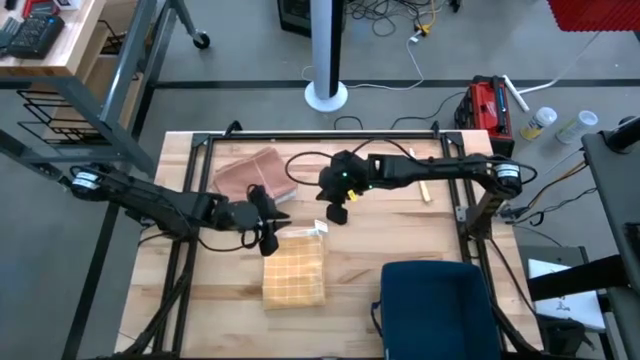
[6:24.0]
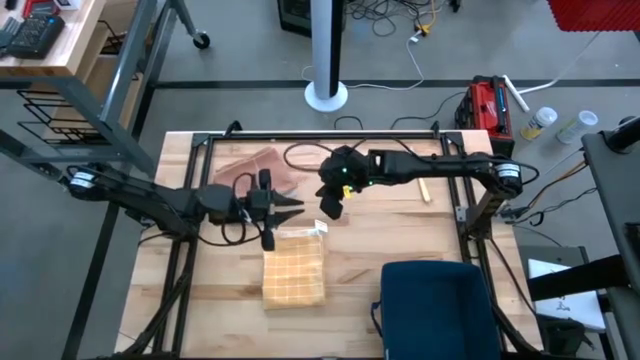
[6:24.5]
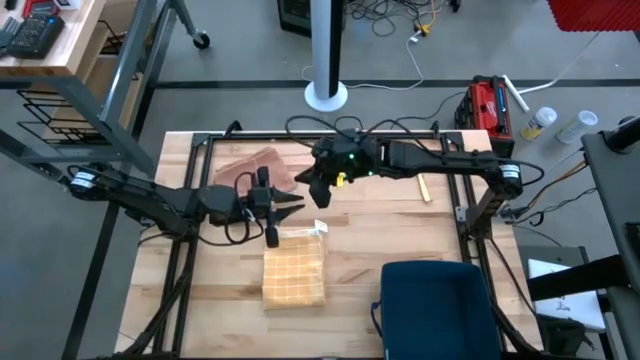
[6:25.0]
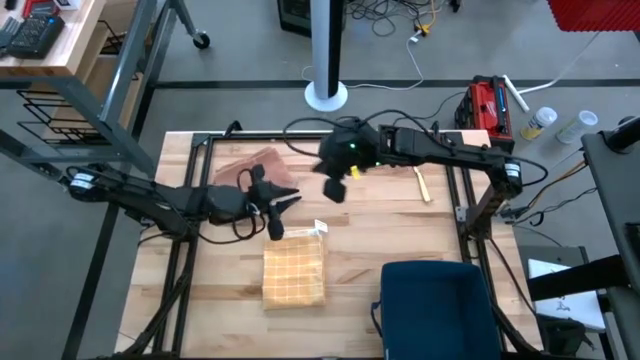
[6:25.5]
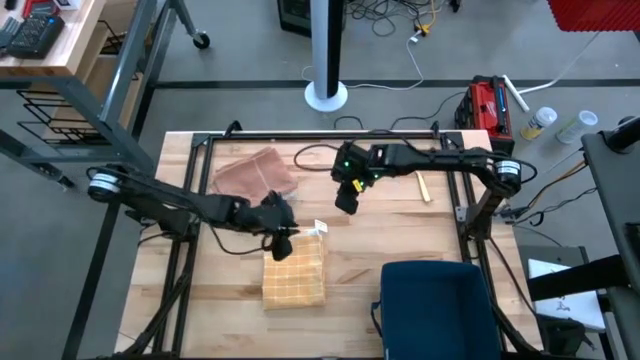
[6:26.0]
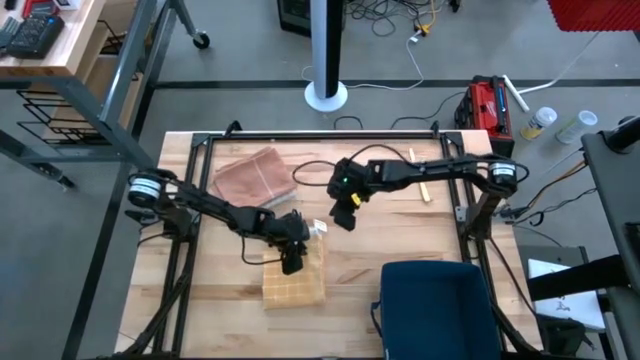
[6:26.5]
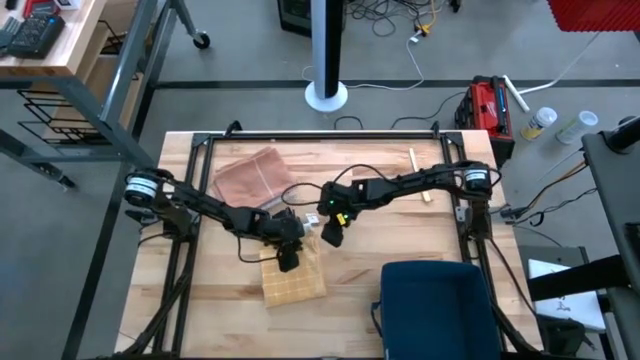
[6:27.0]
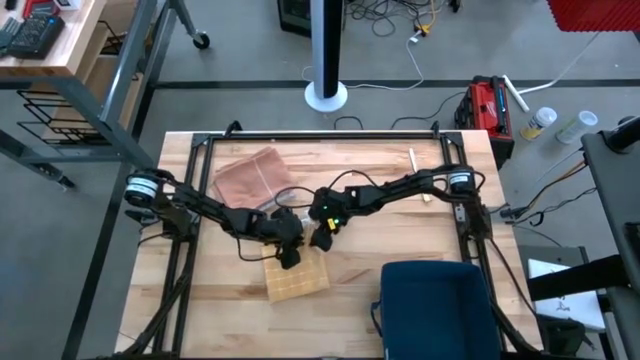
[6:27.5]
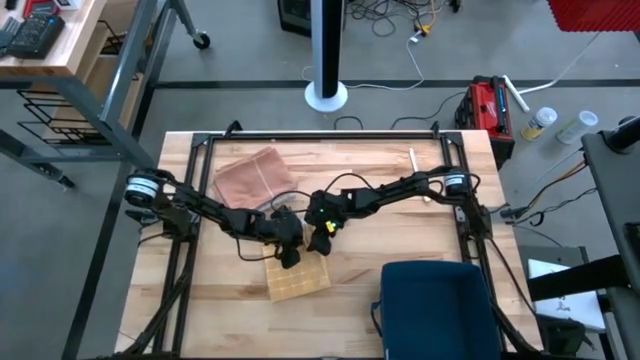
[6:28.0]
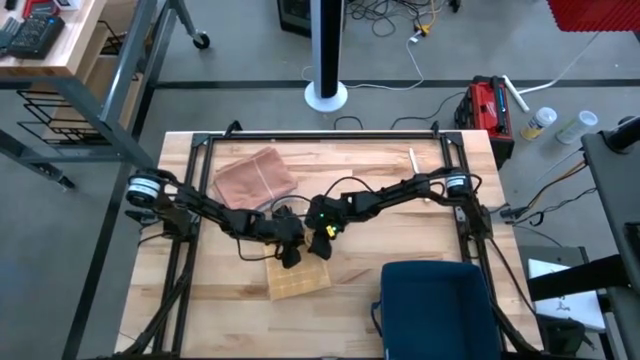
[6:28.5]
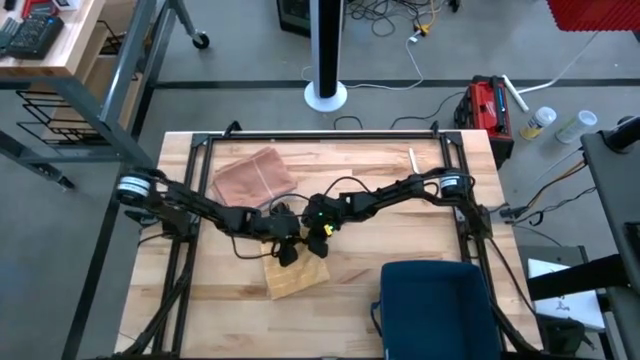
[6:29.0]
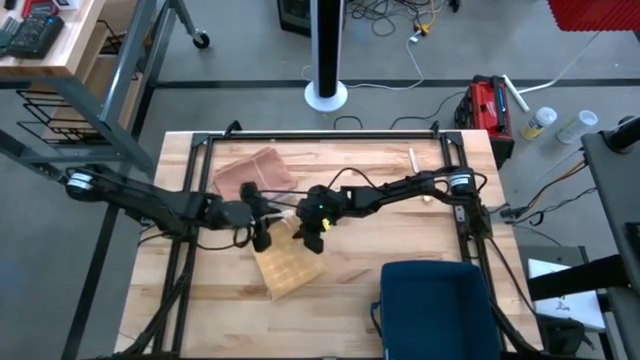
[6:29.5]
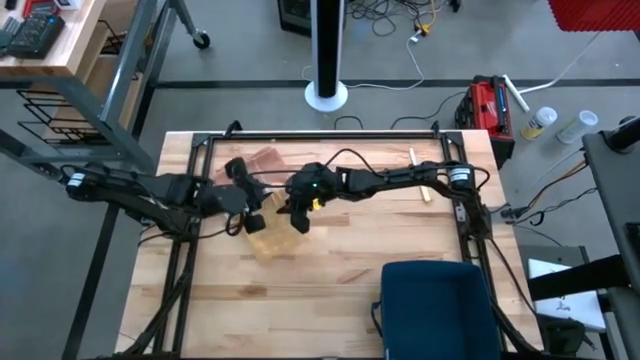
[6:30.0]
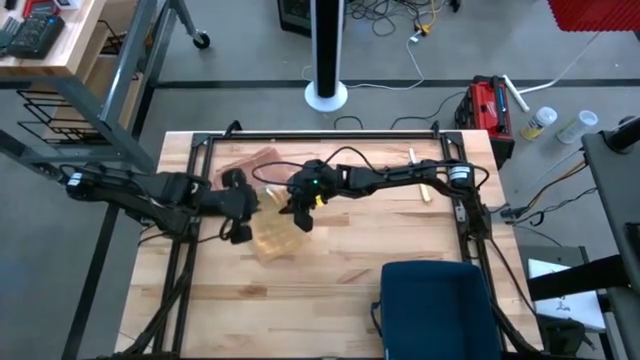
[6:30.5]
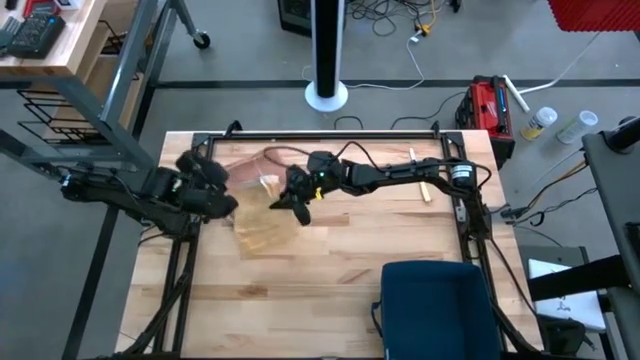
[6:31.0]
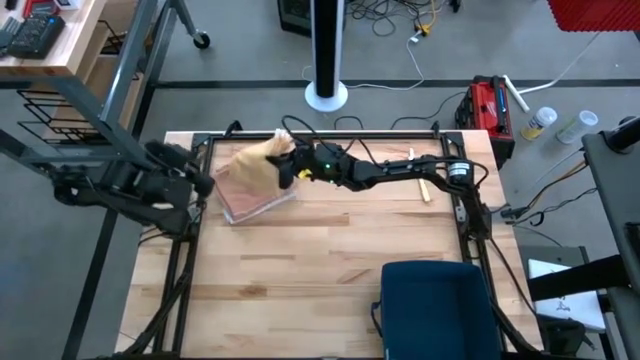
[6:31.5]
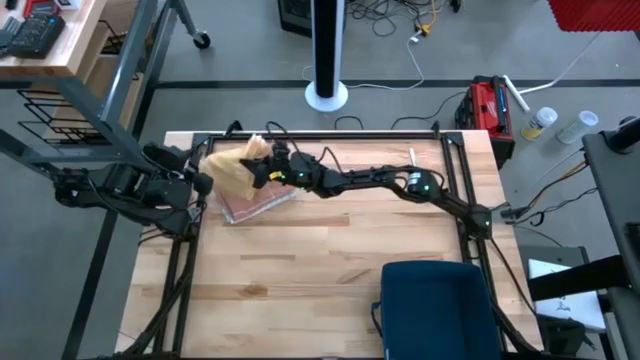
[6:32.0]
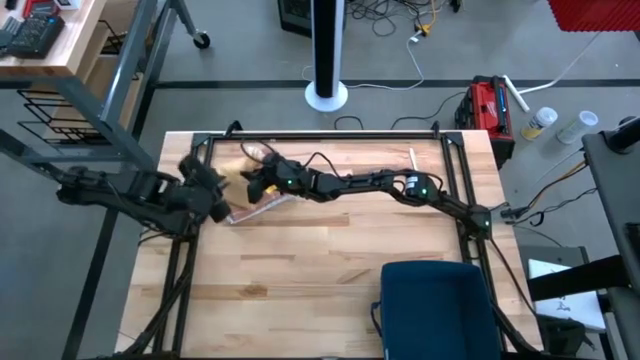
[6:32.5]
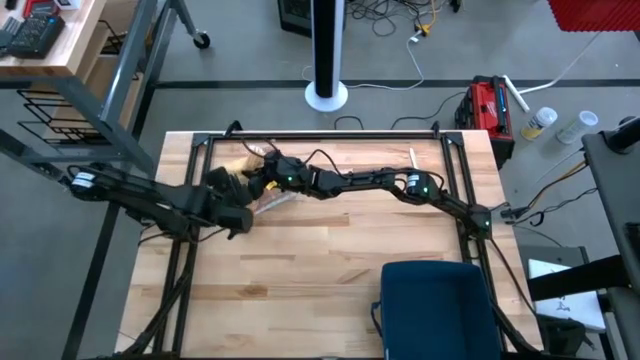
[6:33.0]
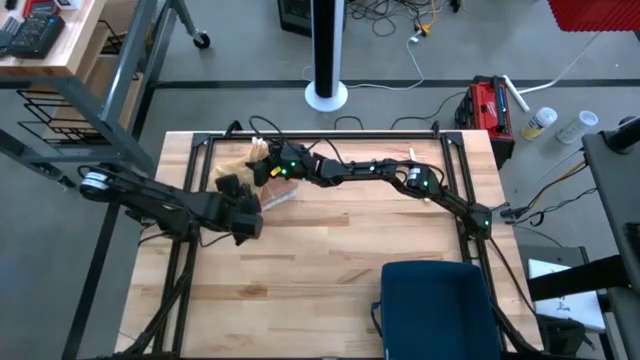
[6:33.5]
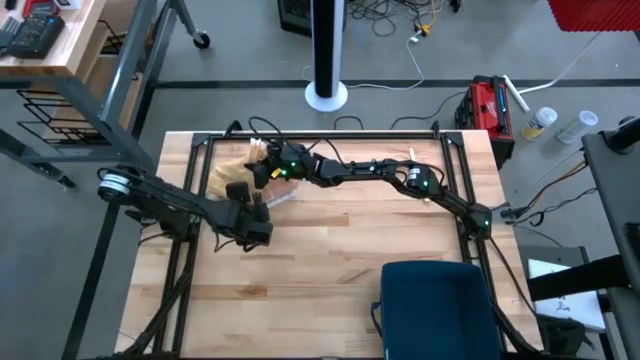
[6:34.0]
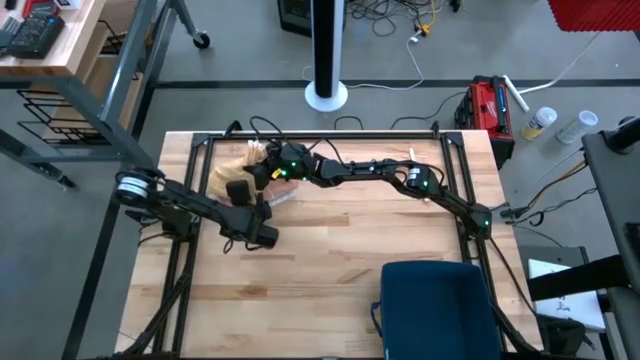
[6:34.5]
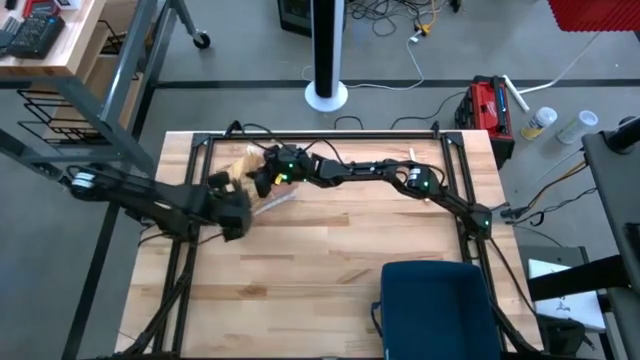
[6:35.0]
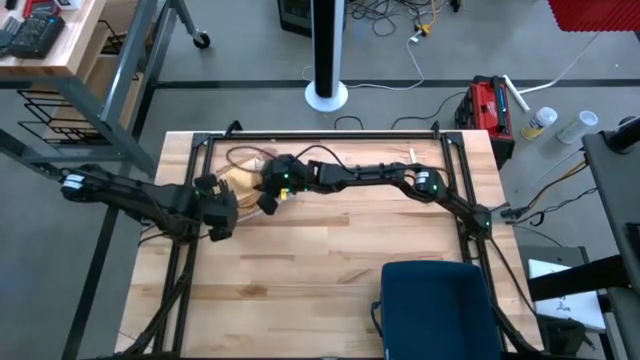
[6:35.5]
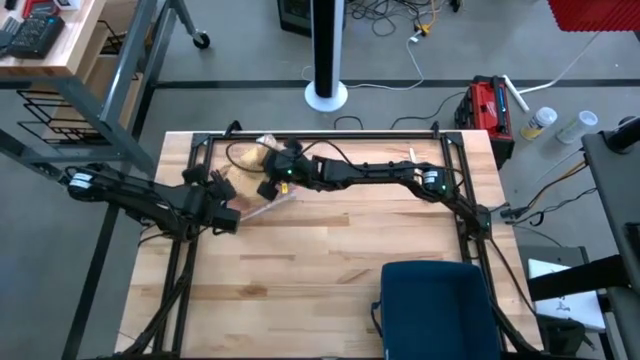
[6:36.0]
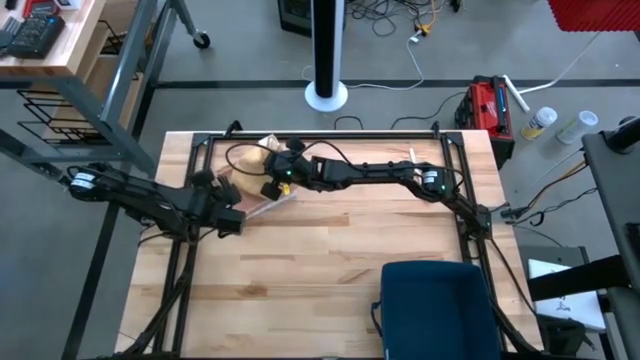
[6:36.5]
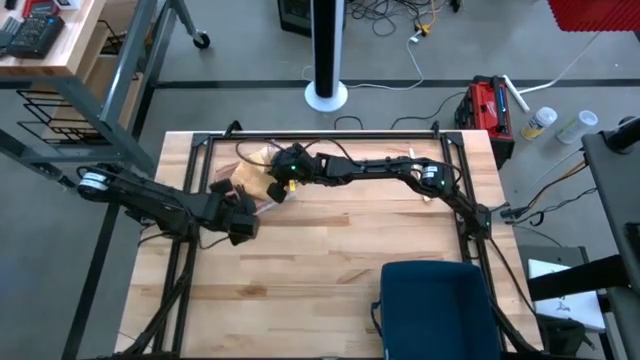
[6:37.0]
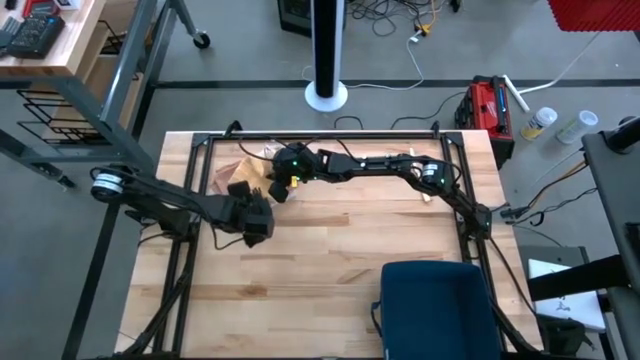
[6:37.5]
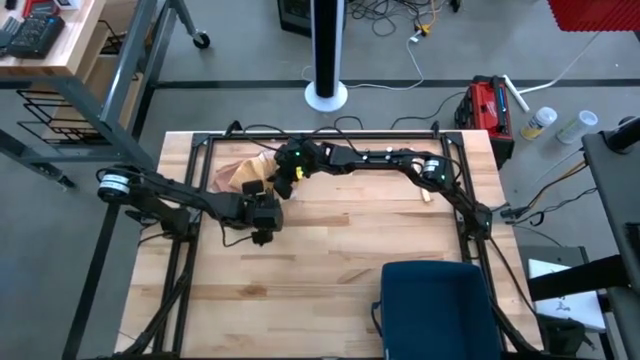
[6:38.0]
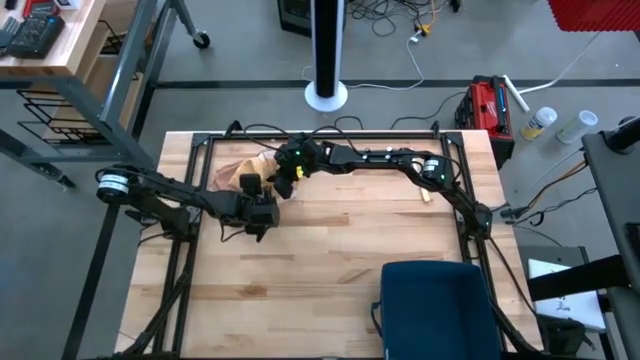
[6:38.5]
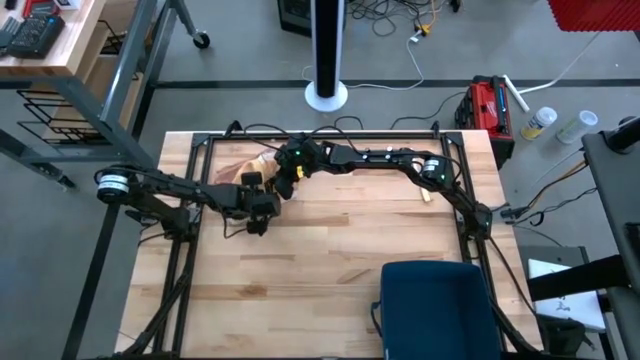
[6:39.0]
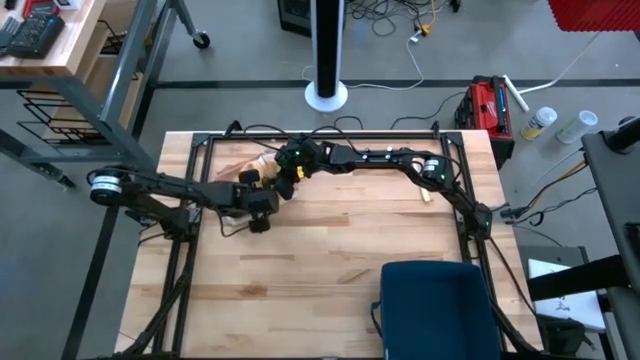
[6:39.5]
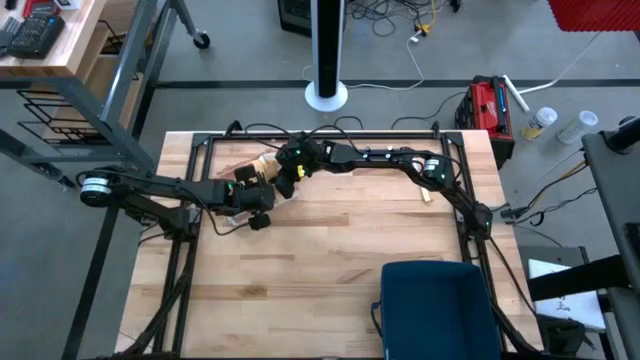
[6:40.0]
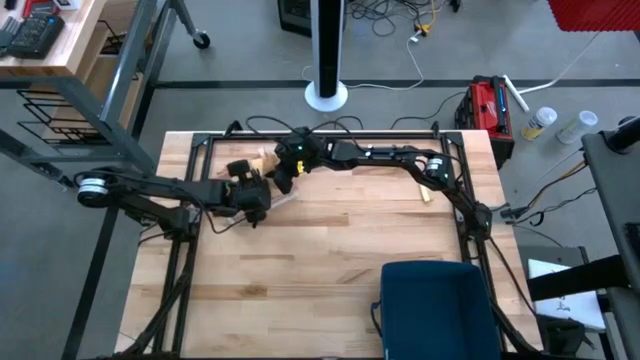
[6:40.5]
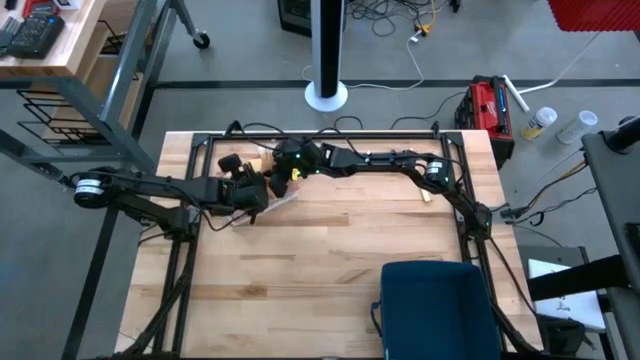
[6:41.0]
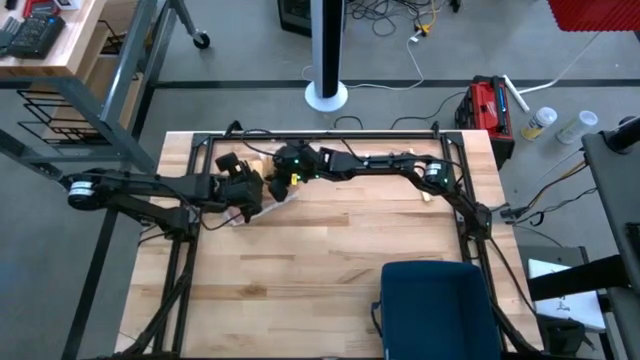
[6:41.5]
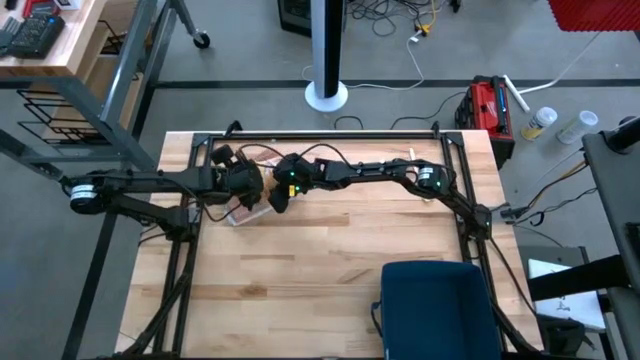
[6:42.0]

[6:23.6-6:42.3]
Task: Fold towel
Stack the yellow towel on top of the brown towel

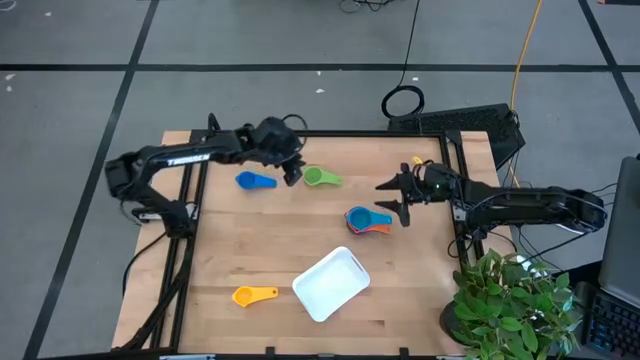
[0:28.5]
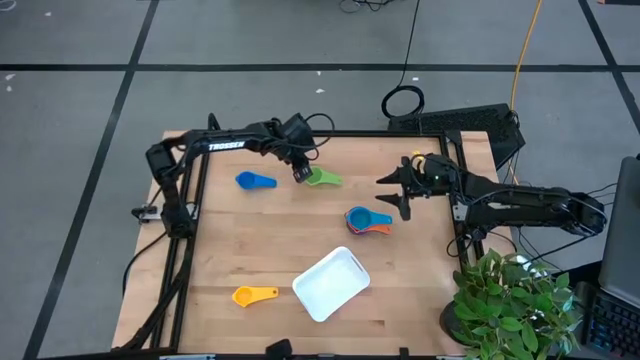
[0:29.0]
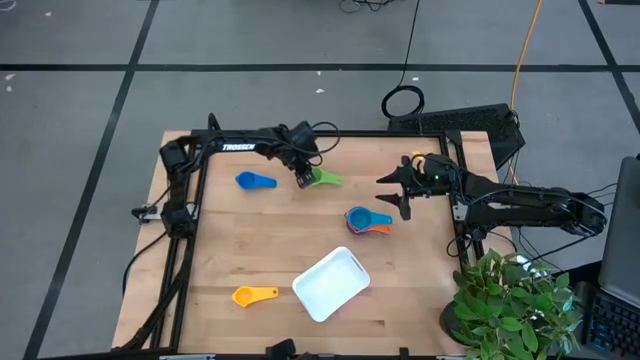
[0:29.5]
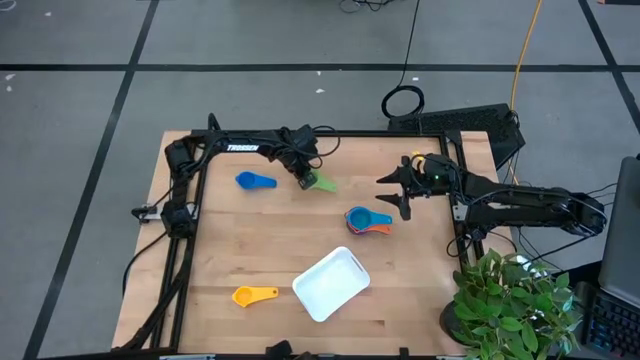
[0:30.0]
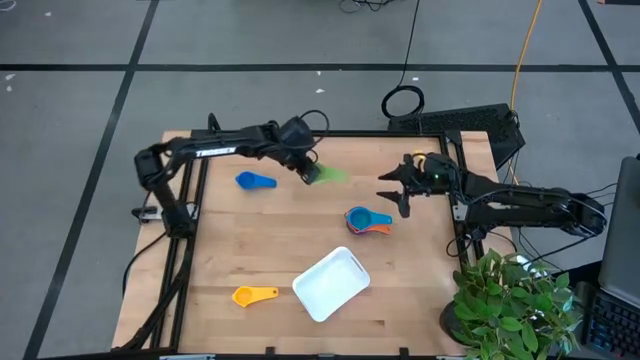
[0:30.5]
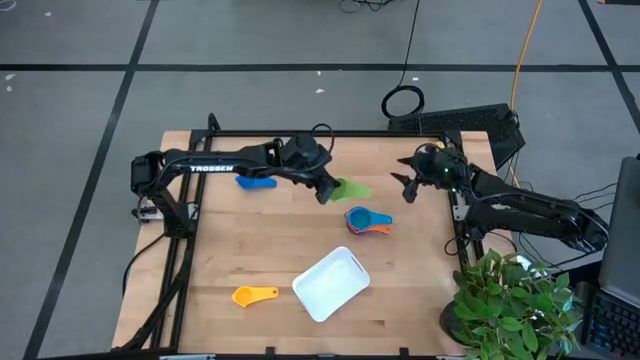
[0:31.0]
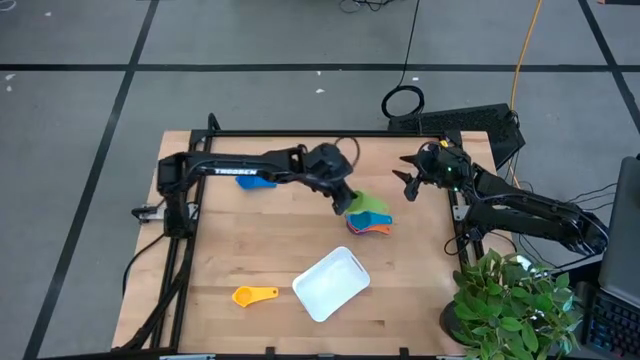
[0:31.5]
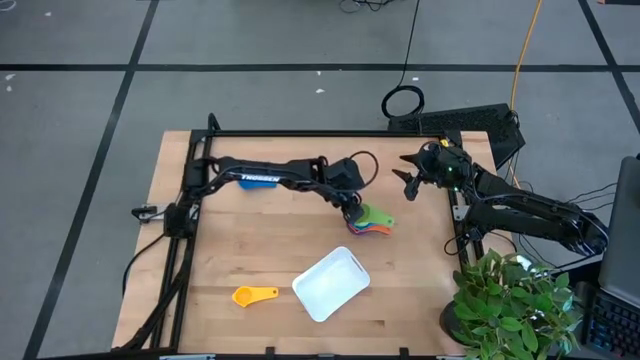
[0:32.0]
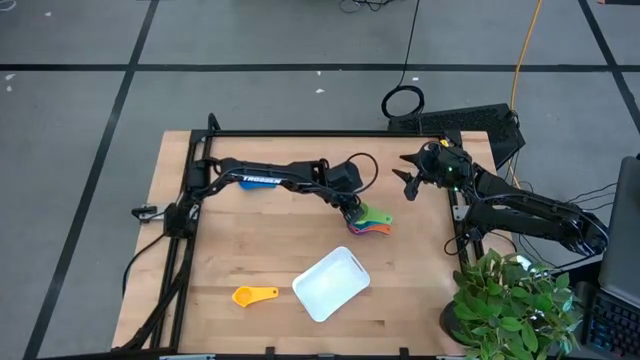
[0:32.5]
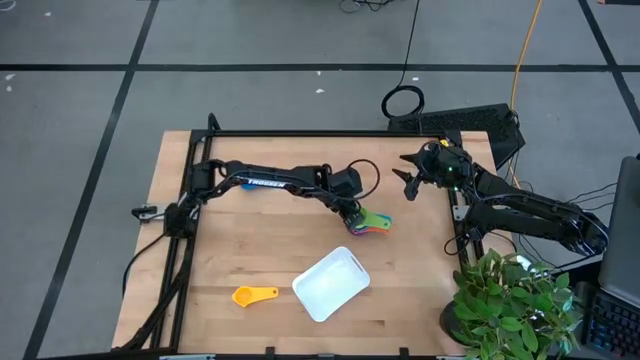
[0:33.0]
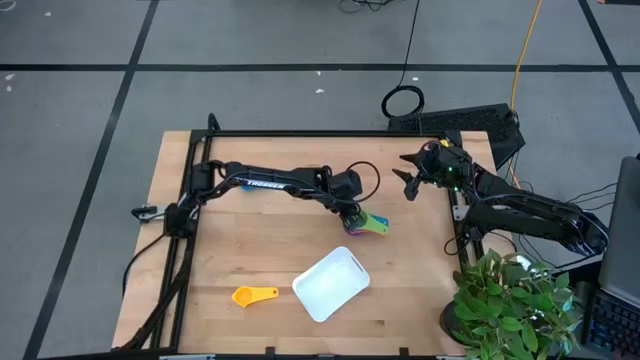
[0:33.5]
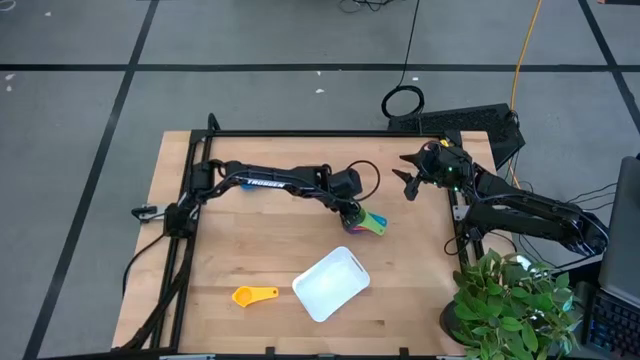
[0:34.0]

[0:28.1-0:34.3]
Task: Nest measuring cups in basket
Stack the green measuring cup on top of the light blue measuring cup
